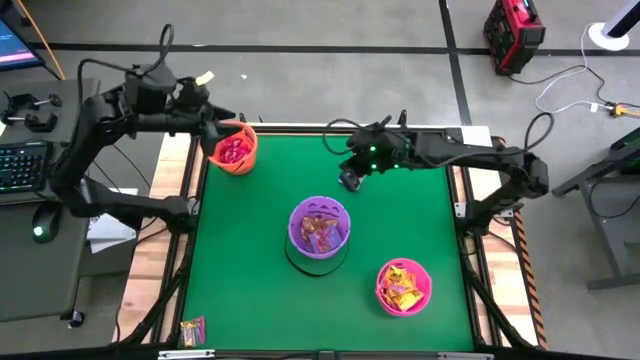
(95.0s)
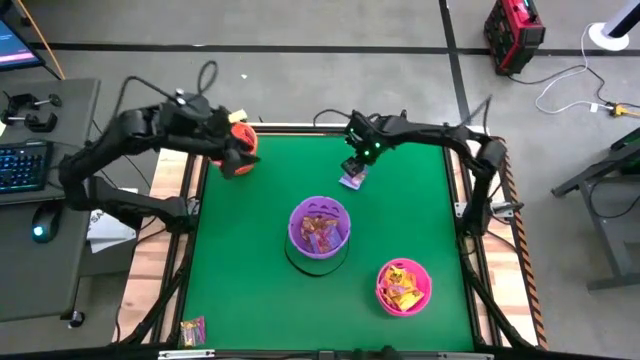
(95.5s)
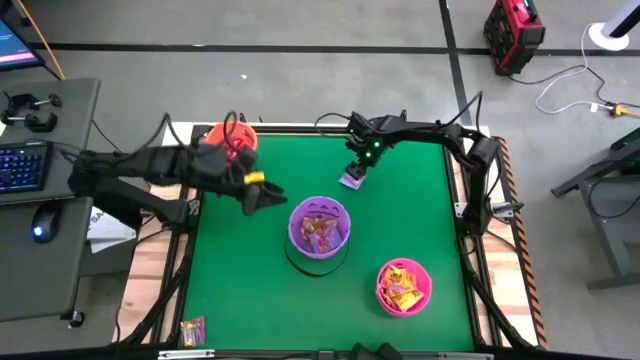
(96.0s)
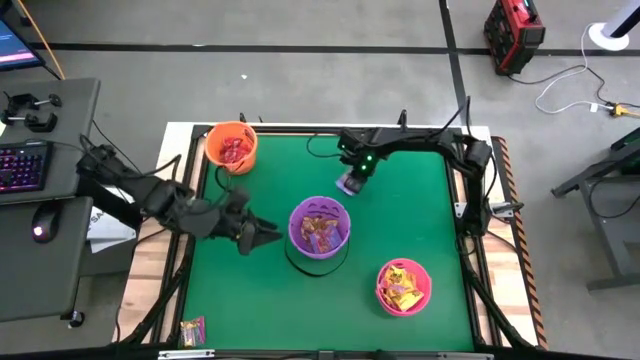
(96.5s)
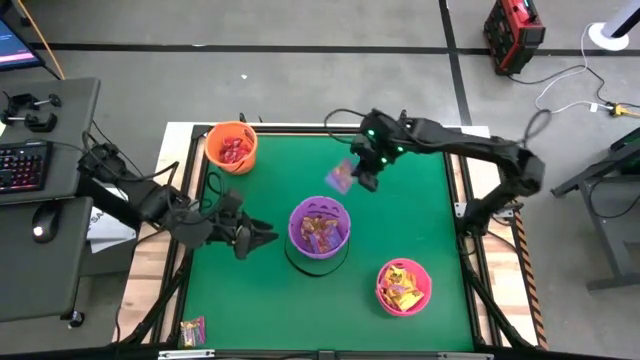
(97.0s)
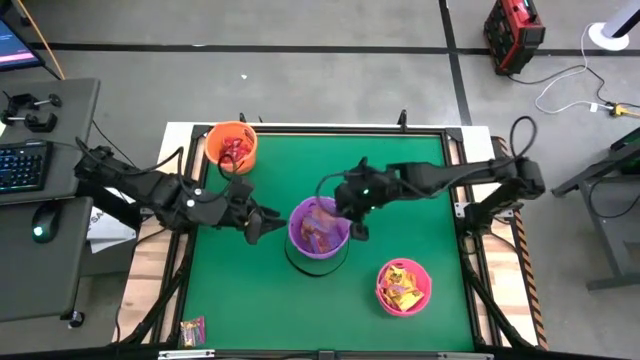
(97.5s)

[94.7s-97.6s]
Task: Sort candy by brand, put in halloween buckets
Put the violet candy into the violet bucket

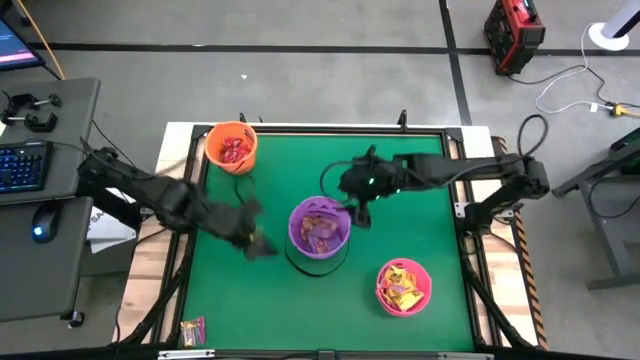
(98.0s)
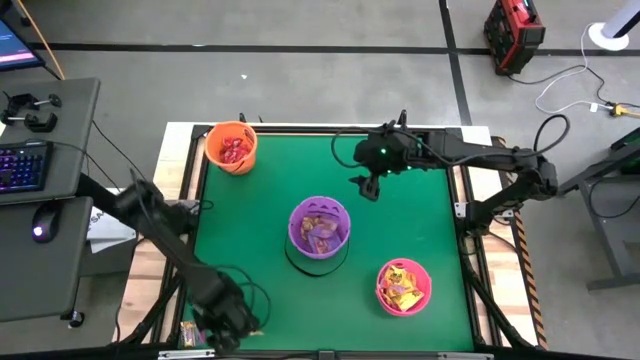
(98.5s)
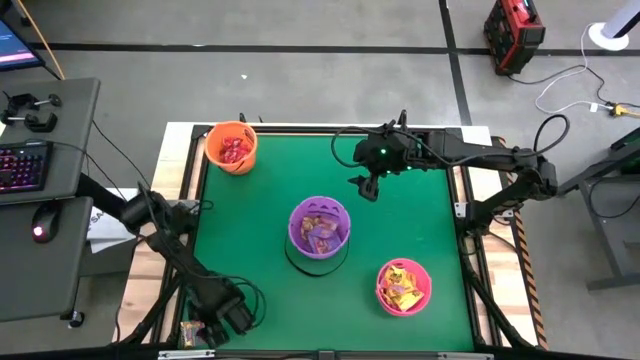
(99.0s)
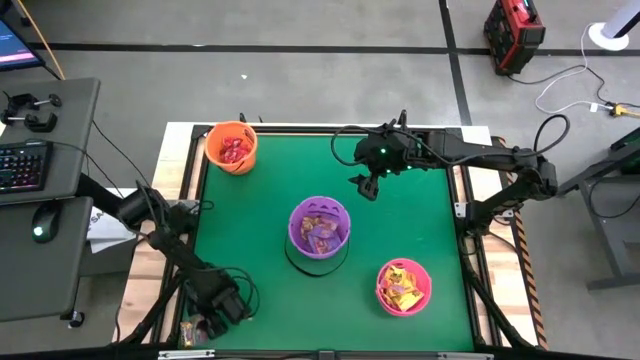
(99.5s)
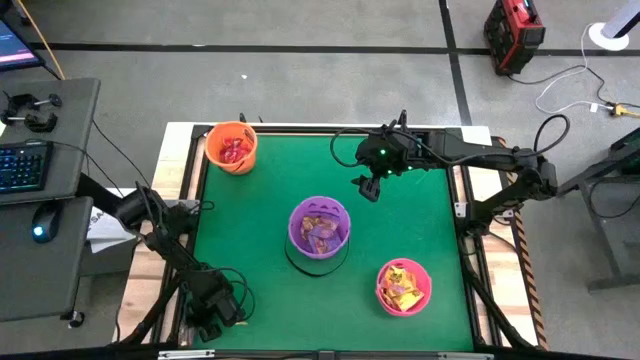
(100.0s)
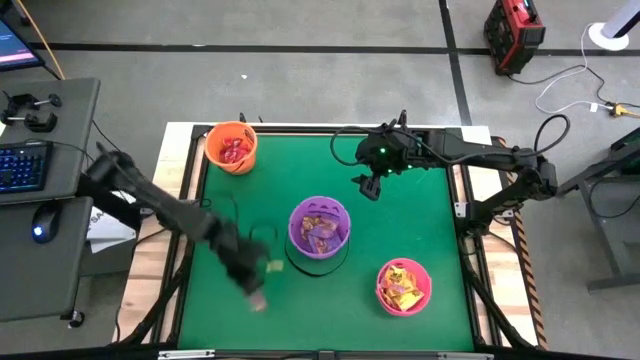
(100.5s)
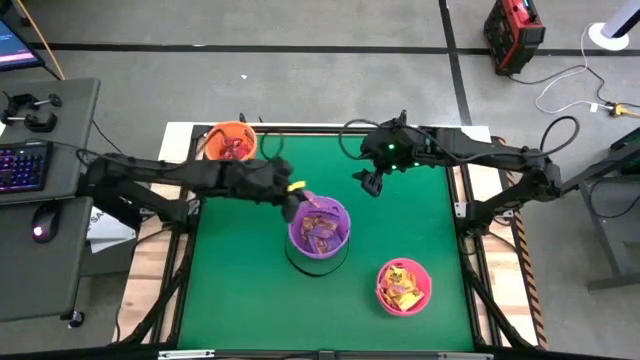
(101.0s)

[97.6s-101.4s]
Put the violet candy into the violet bucket

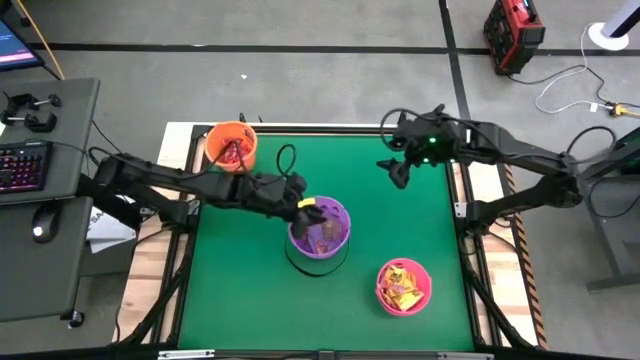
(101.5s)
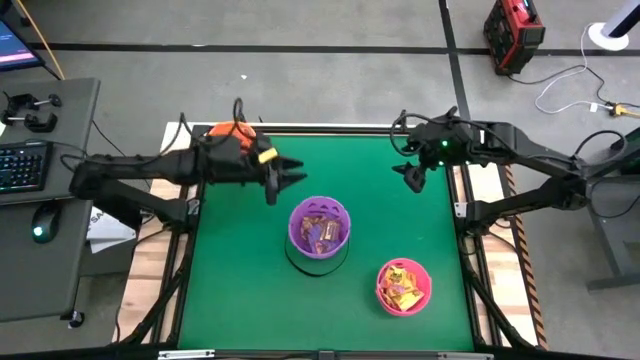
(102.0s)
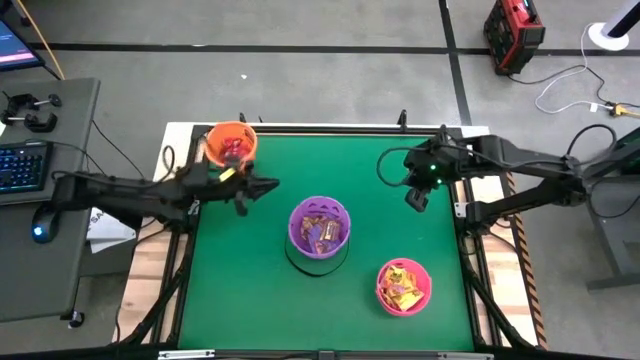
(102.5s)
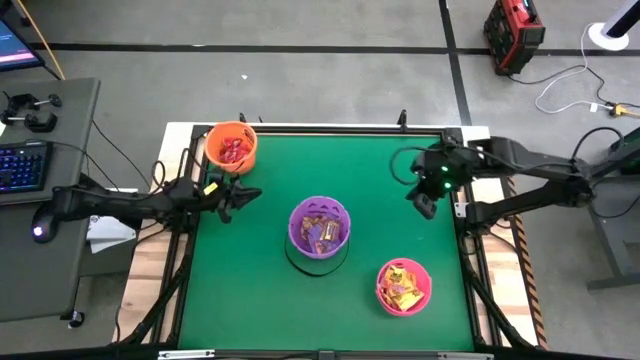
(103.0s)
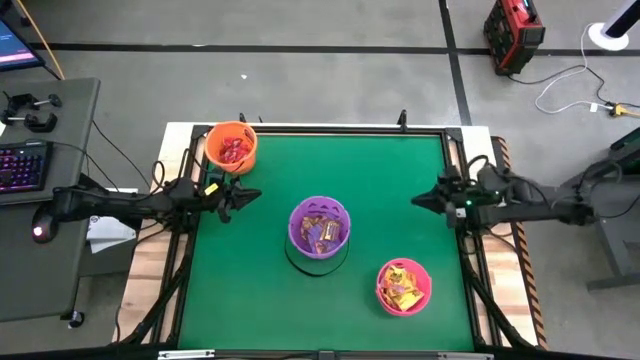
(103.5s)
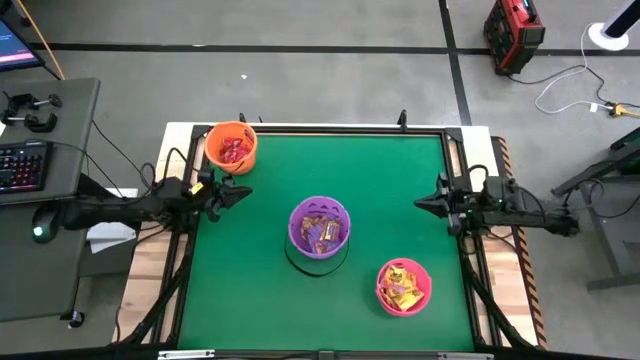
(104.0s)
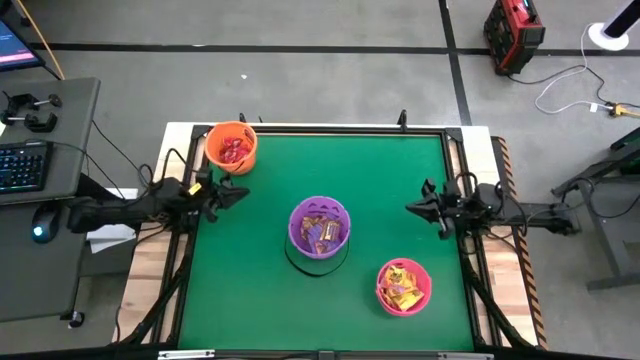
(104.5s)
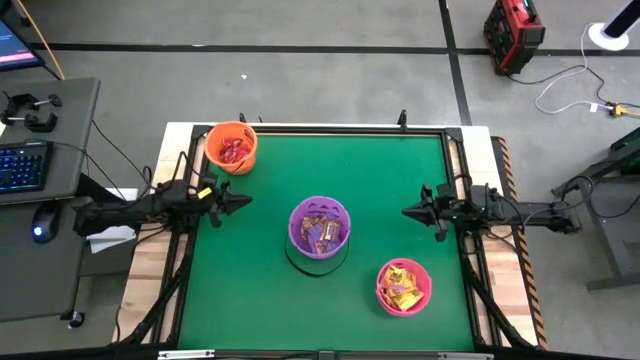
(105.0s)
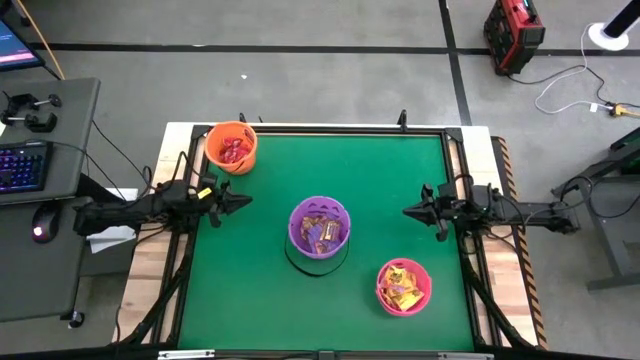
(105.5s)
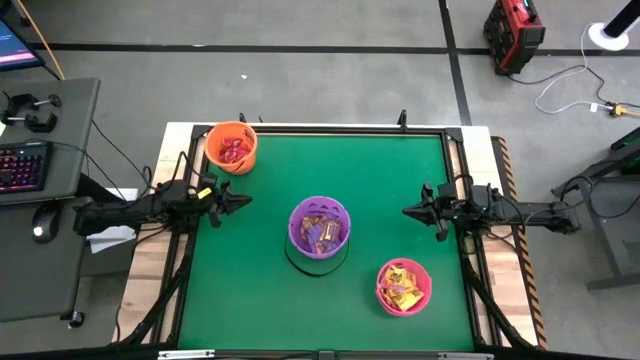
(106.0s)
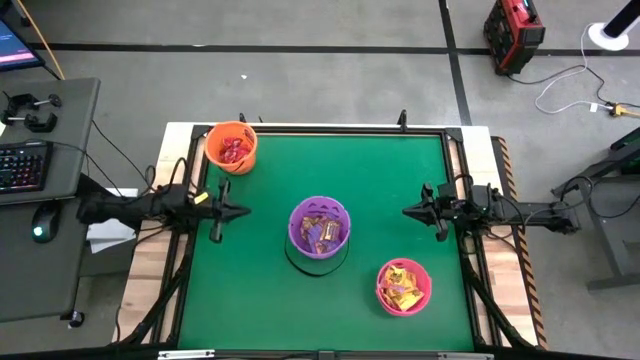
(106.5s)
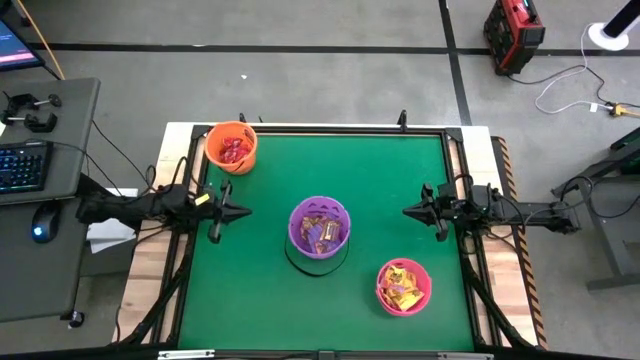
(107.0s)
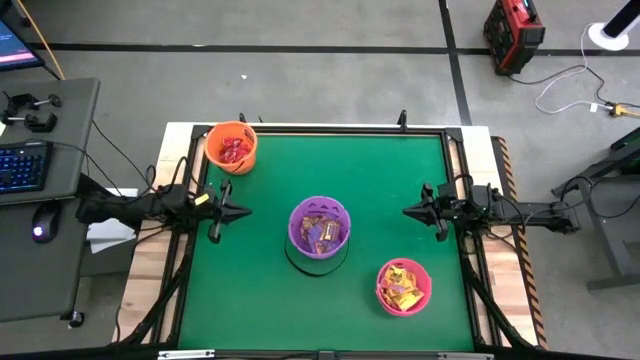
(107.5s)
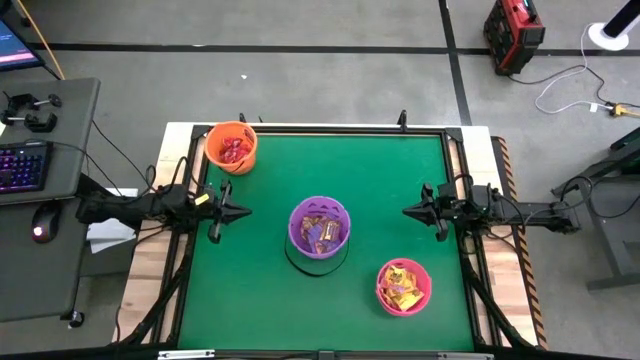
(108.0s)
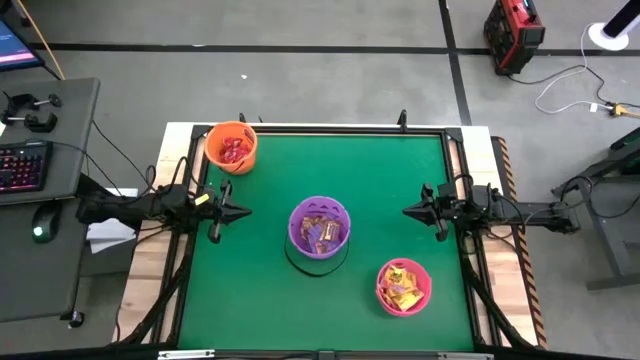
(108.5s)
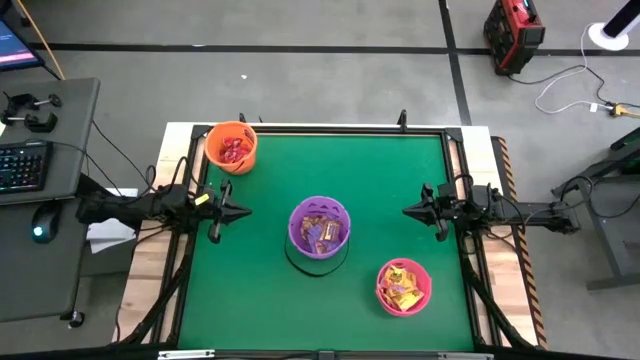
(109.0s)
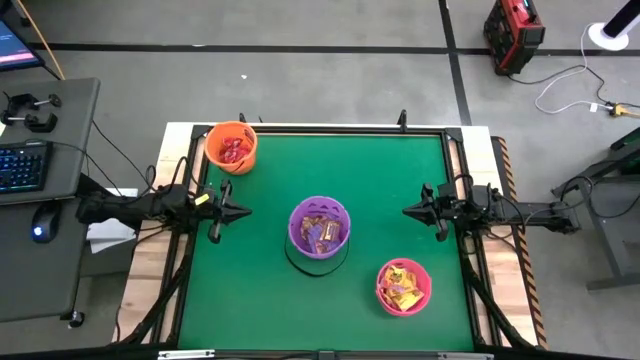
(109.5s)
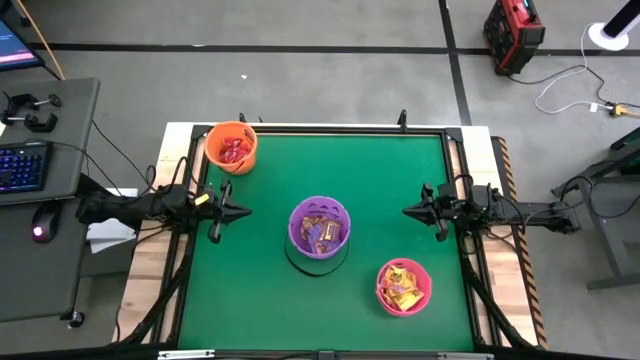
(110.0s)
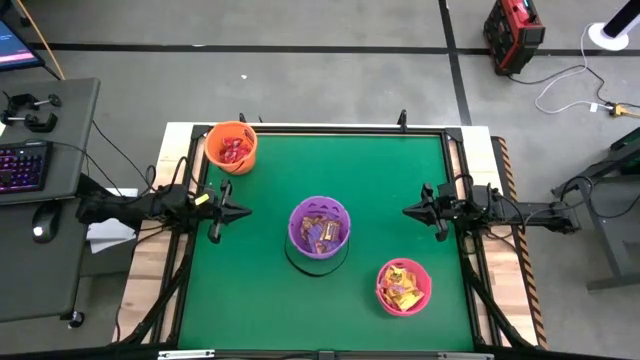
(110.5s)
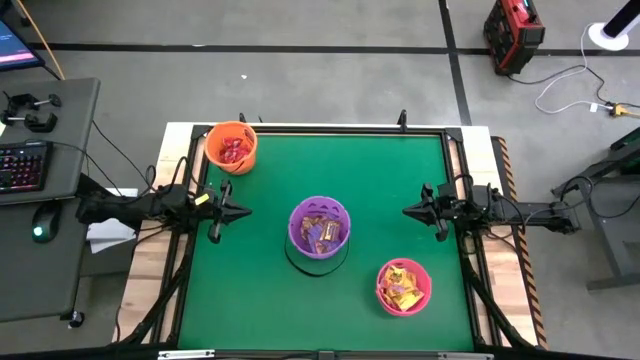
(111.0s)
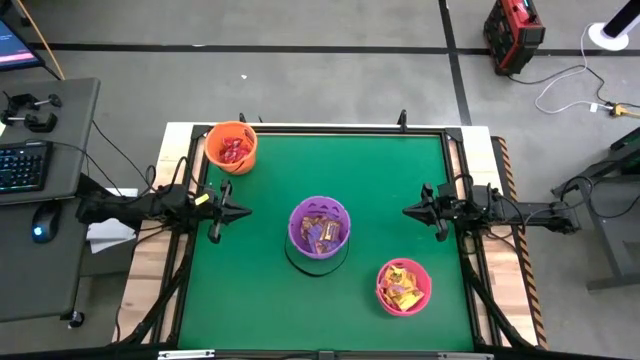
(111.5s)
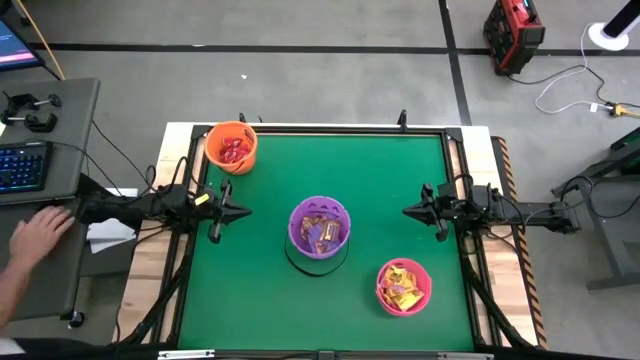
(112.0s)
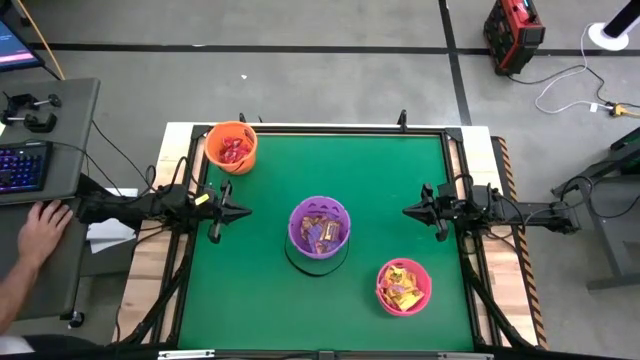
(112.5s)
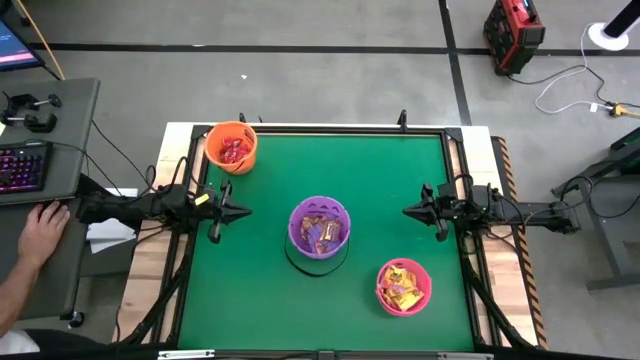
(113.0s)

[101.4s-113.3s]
Return to Home Position

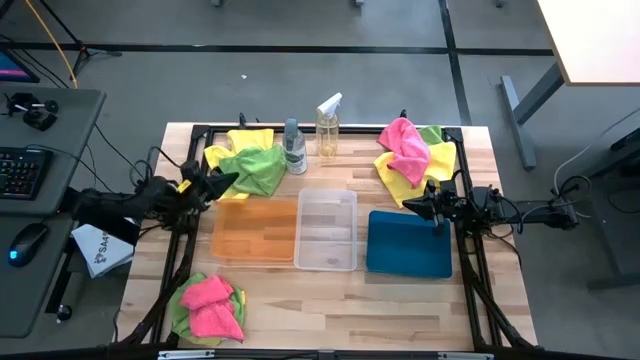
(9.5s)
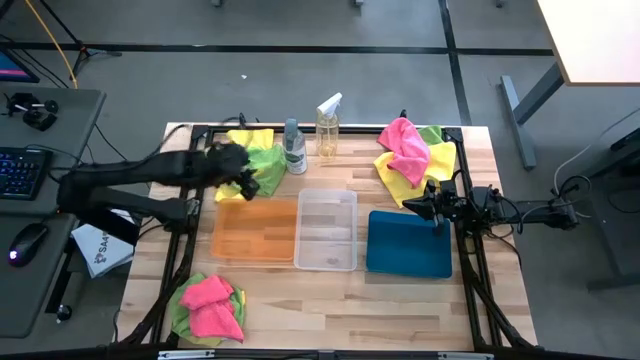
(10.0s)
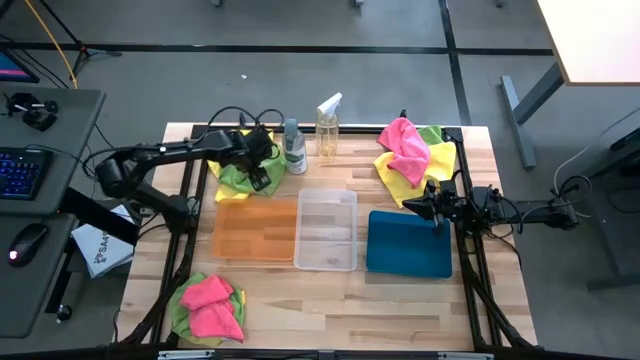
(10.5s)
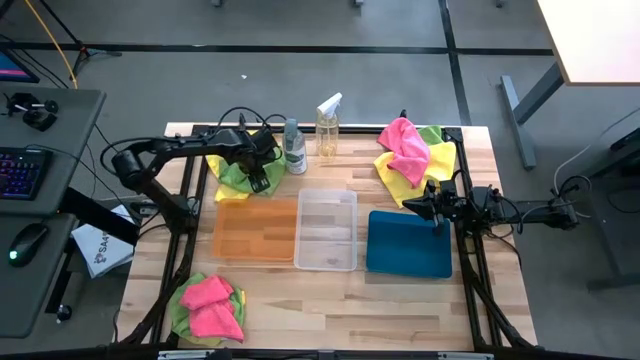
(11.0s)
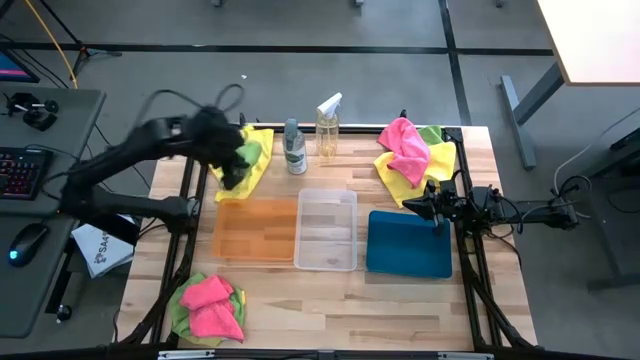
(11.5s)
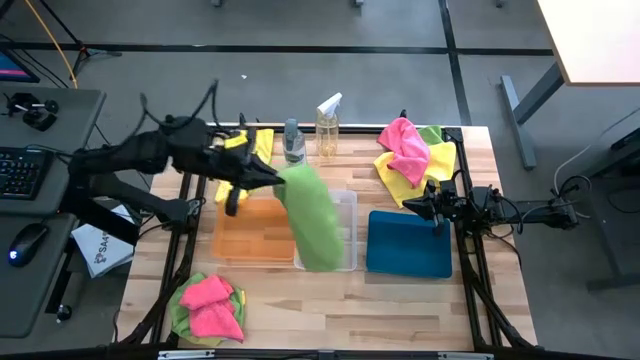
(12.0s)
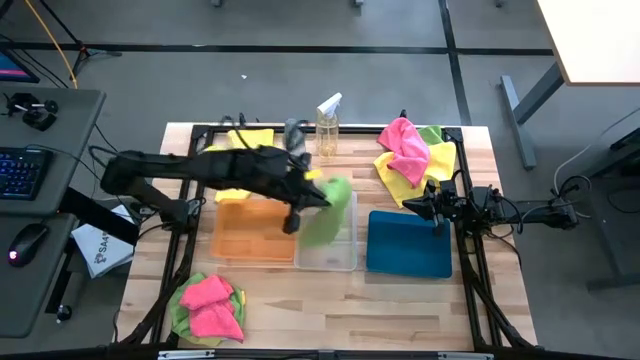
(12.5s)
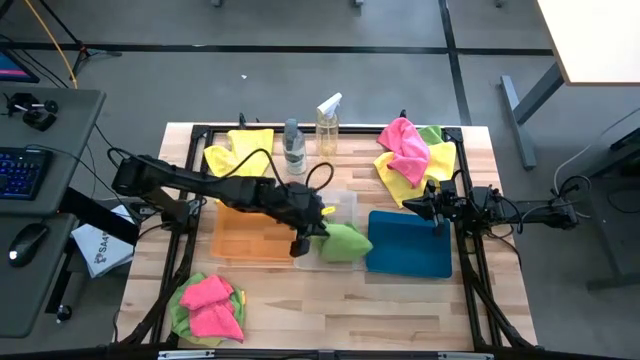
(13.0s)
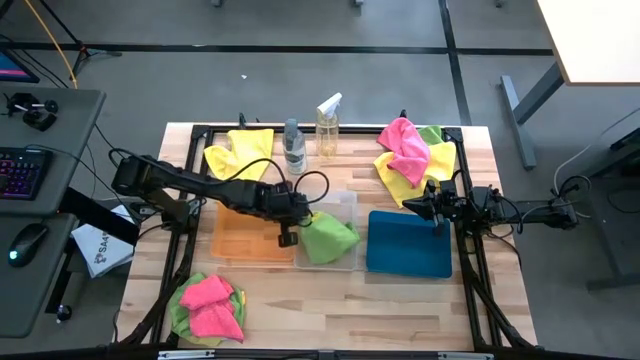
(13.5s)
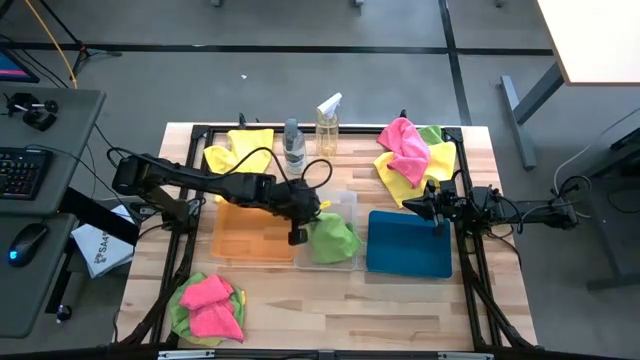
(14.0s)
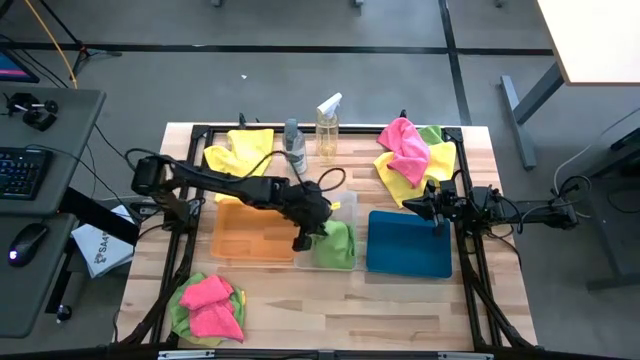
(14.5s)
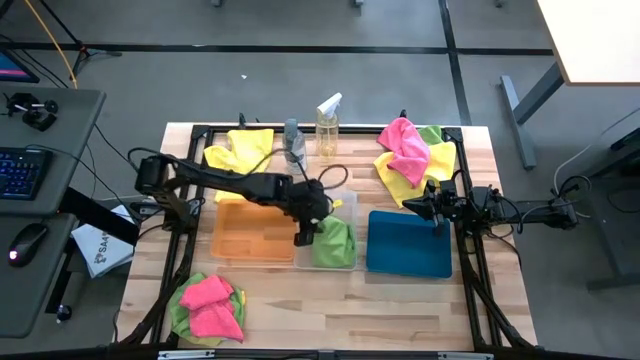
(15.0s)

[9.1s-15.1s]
Task: Sort microfiber towel by color & place in baskets
Put the top left green microfiber cloth into the transparent bin
